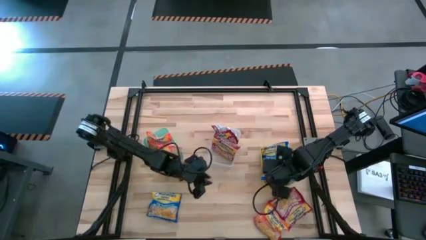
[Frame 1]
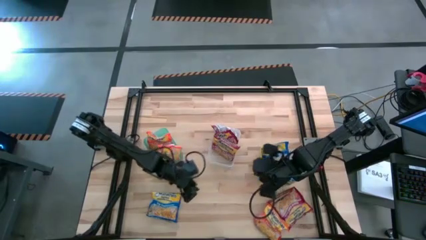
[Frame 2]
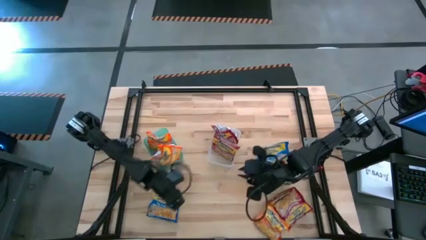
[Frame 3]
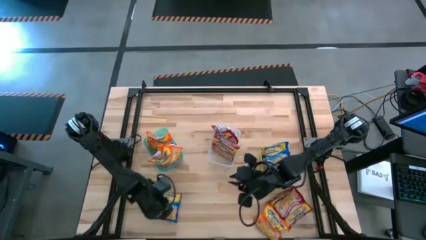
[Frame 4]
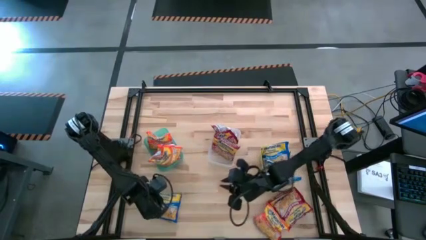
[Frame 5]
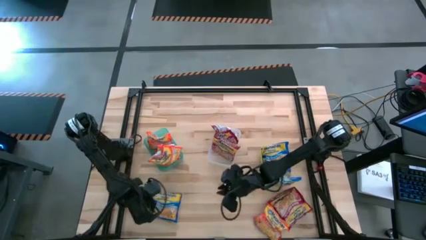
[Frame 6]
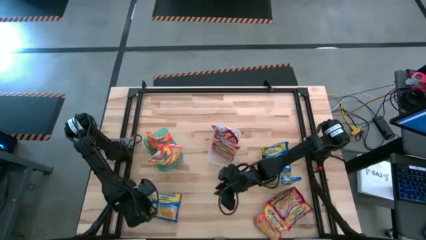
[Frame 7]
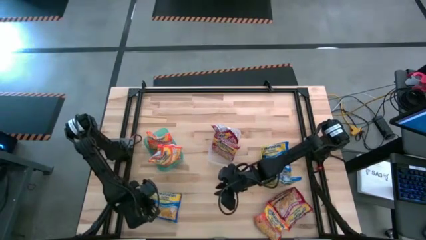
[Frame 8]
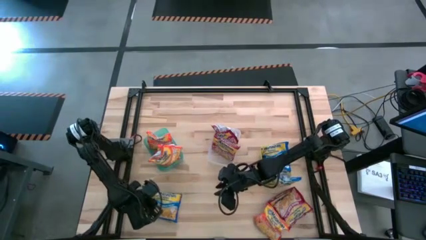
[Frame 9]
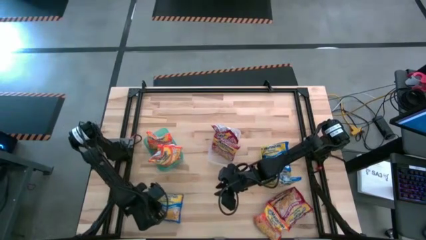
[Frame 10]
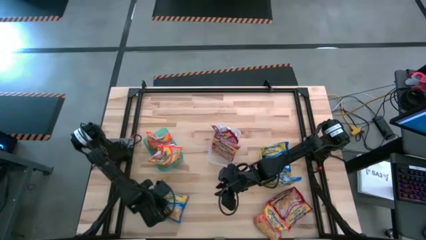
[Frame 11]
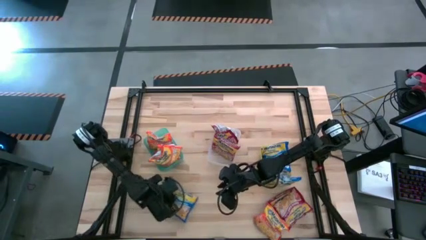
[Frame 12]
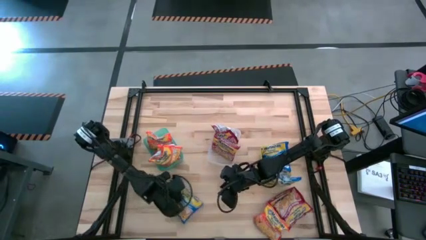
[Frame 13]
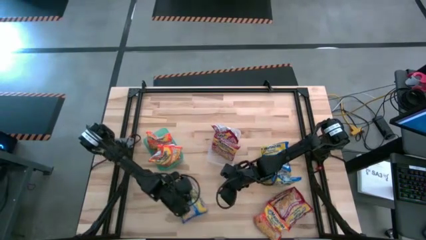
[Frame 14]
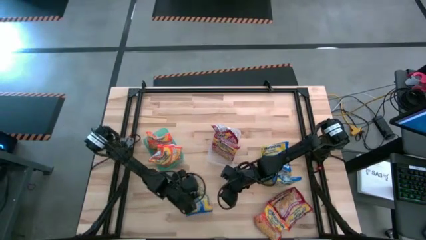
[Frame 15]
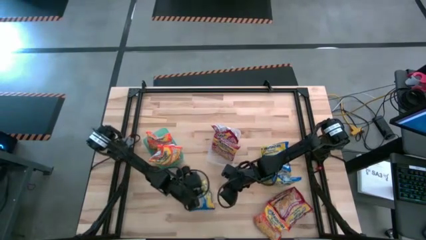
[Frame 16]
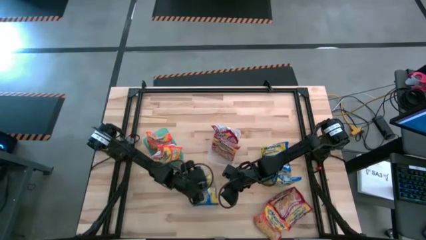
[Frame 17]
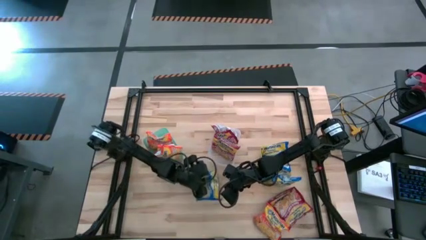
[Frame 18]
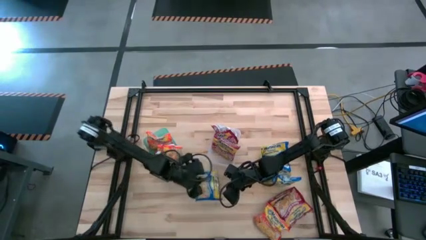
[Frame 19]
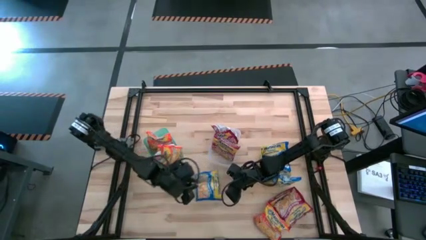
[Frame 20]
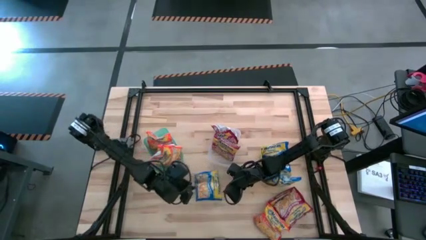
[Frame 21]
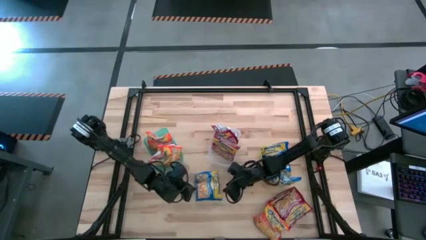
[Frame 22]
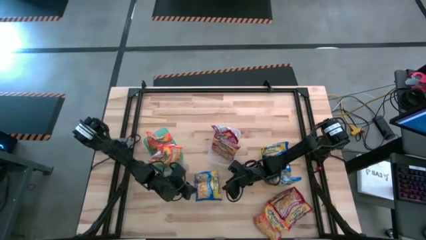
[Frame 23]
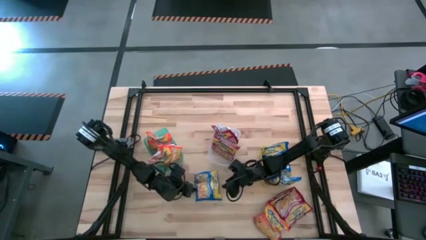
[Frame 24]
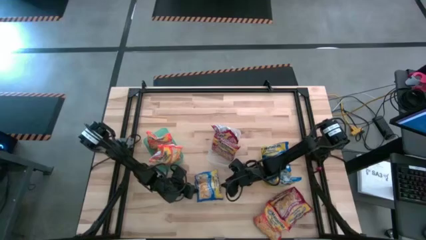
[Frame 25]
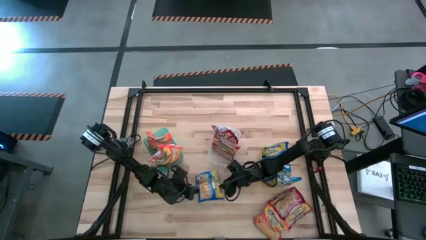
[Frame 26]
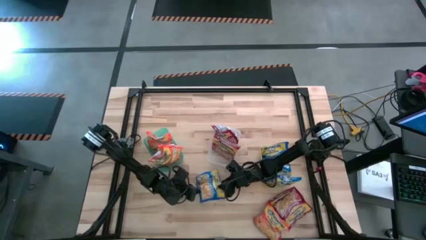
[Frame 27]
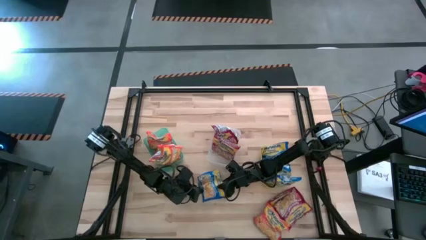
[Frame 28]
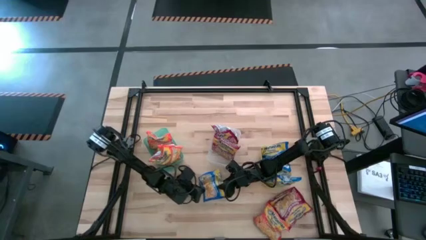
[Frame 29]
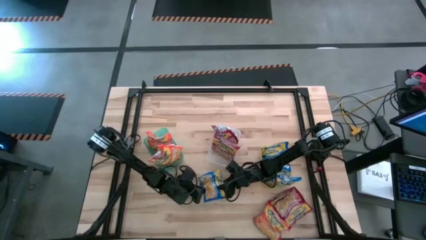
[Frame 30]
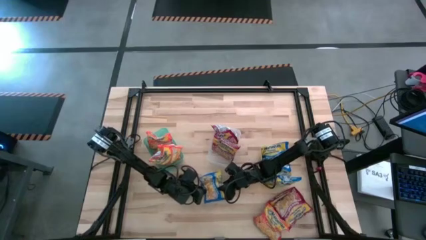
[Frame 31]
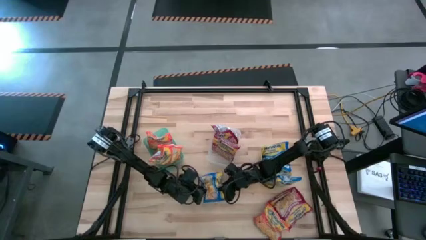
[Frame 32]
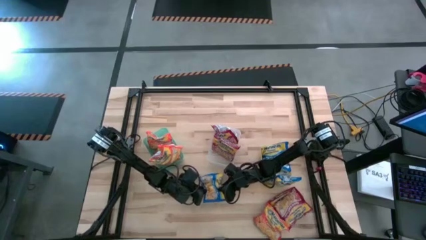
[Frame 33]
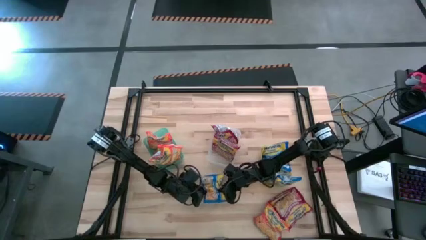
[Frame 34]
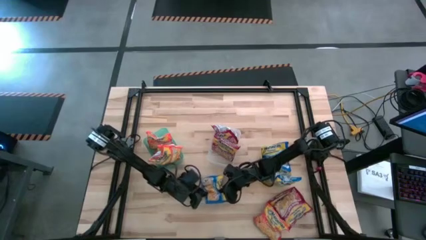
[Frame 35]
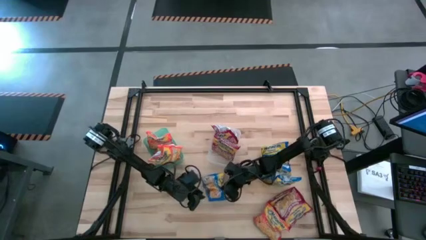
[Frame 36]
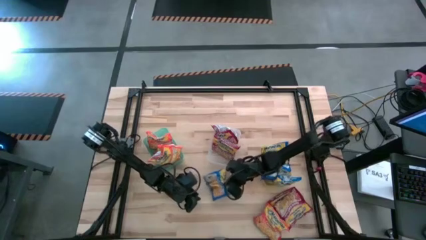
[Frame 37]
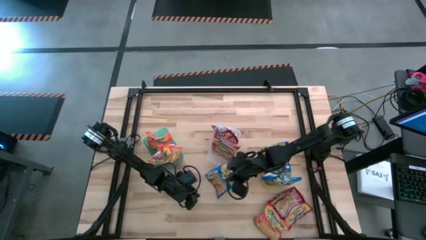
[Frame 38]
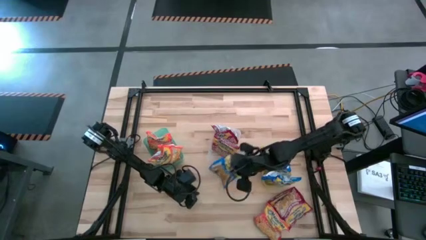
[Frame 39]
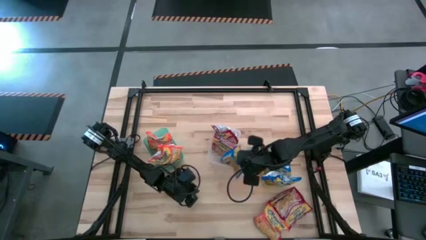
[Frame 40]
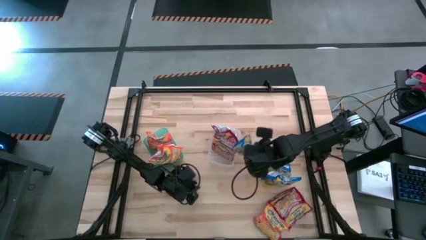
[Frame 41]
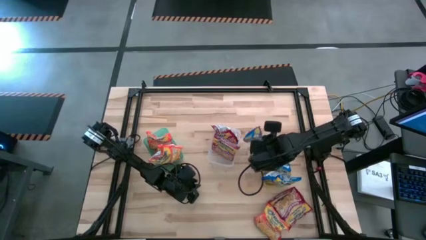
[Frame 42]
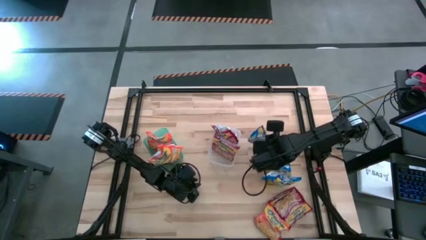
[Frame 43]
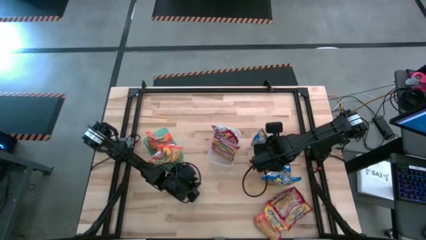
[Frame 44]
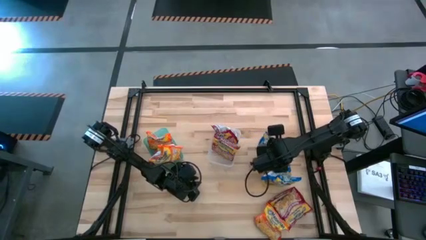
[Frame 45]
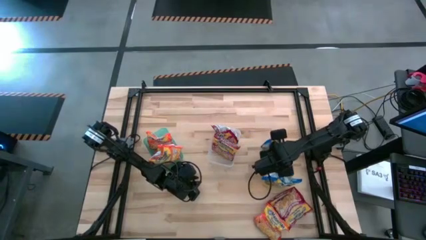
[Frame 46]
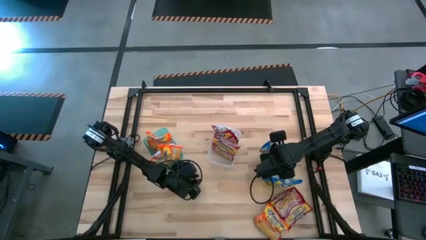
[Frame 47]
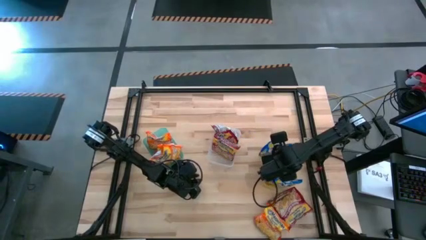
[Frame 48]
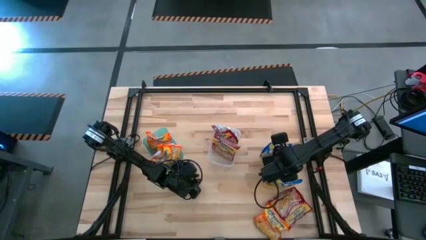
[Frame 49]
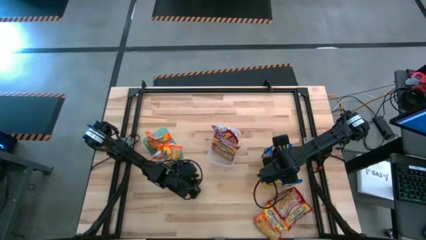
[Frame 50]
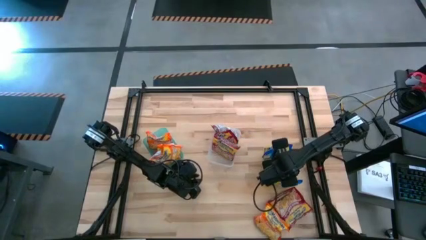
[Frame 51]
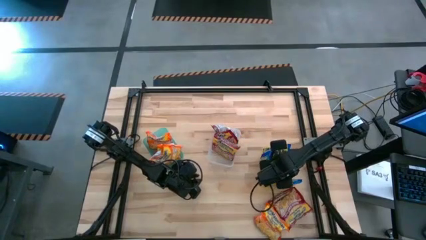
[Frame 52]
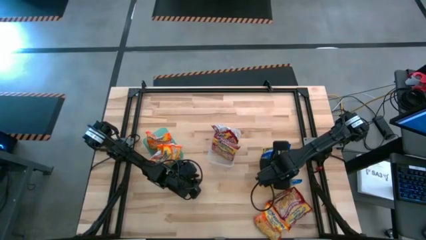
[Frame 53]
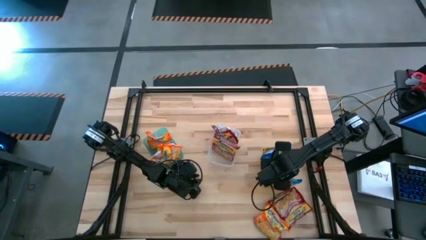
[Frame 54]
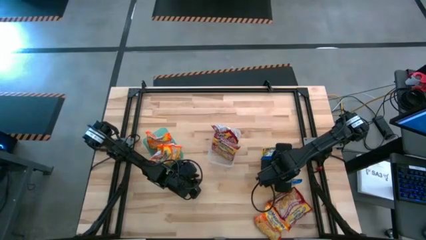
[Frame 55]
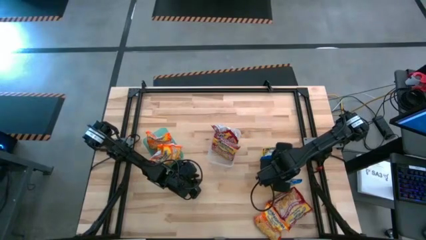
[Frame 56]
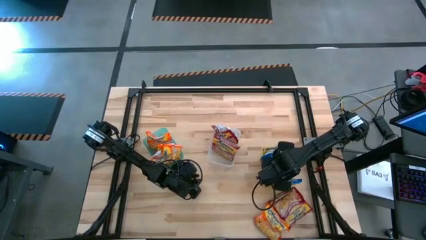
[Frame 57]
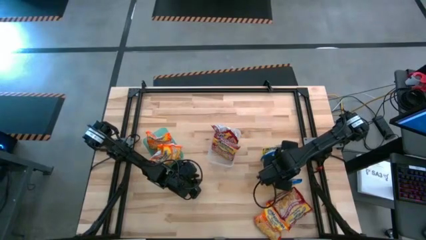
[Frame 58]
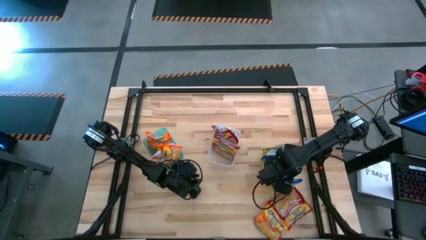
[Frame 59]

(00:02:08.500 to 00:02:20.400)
Task: Sort Maruchan noodles
Put the blue noodle pack into the yellow bin

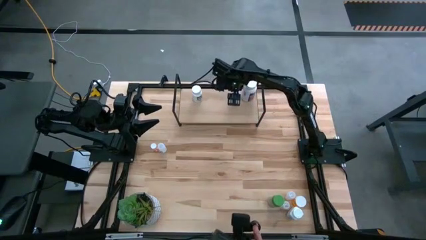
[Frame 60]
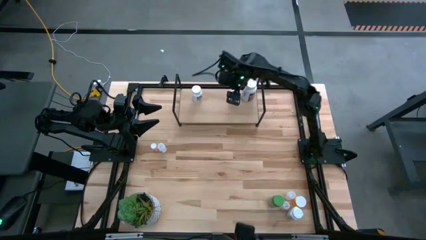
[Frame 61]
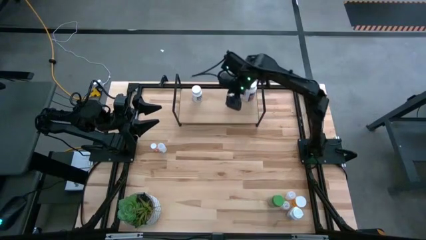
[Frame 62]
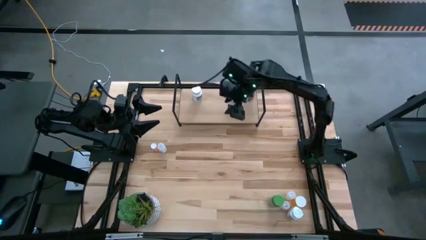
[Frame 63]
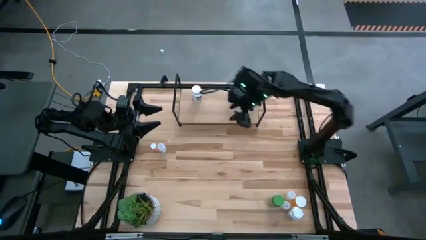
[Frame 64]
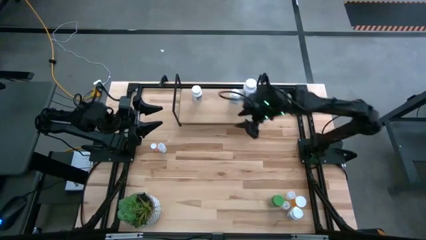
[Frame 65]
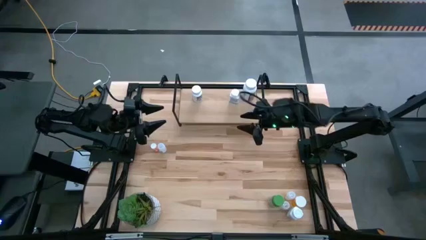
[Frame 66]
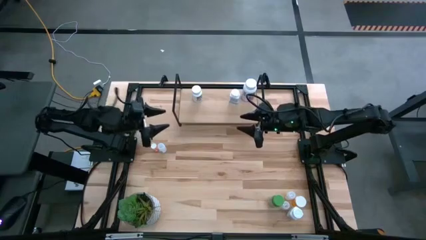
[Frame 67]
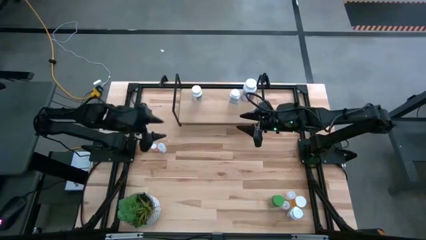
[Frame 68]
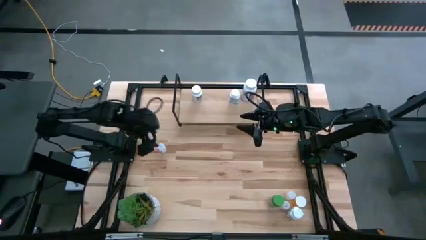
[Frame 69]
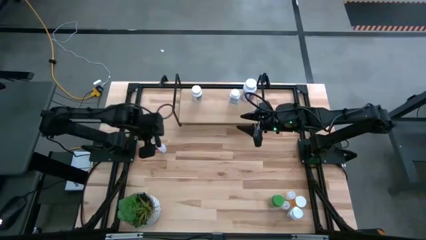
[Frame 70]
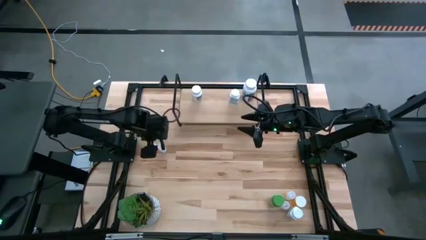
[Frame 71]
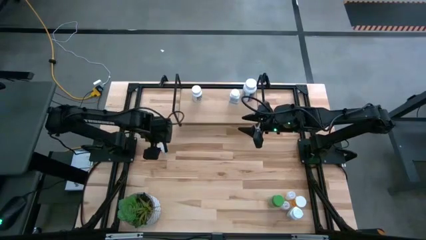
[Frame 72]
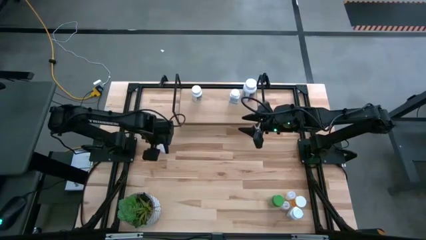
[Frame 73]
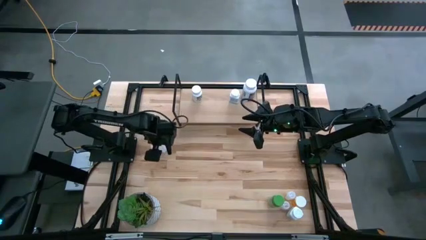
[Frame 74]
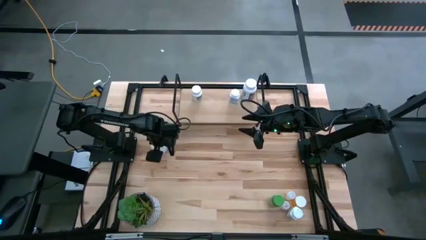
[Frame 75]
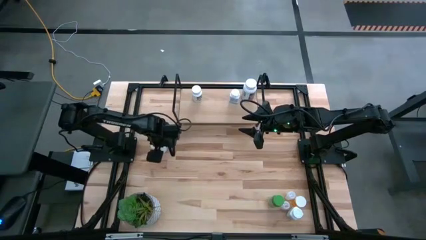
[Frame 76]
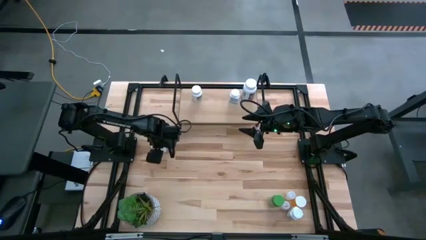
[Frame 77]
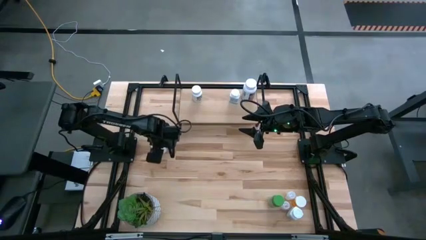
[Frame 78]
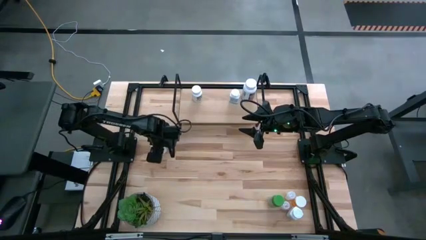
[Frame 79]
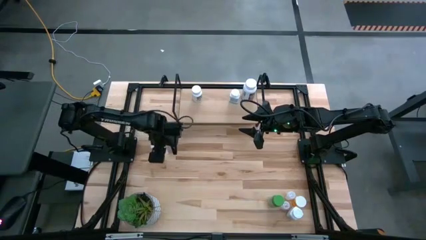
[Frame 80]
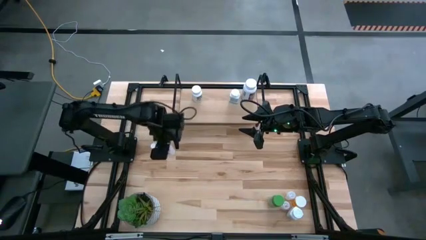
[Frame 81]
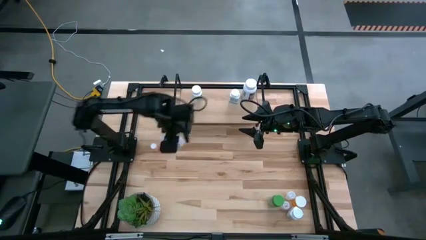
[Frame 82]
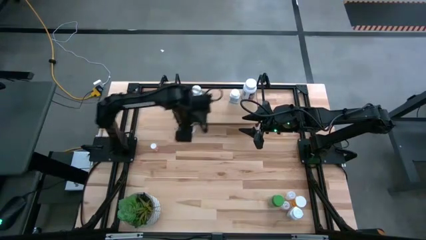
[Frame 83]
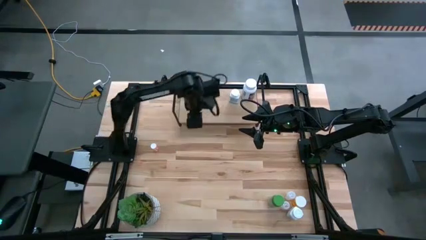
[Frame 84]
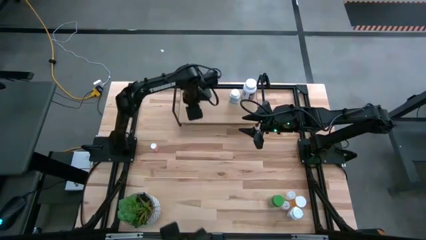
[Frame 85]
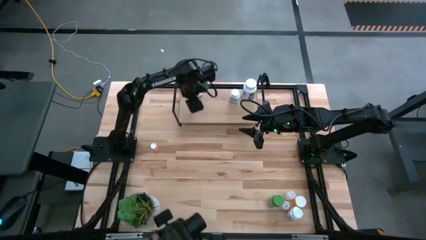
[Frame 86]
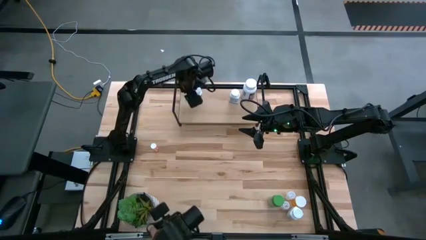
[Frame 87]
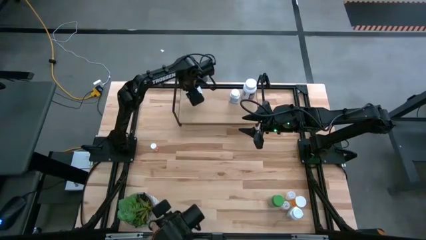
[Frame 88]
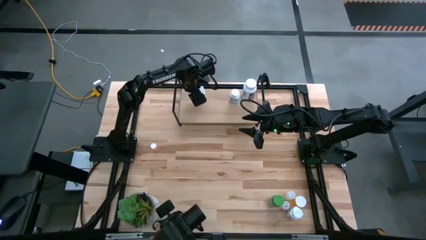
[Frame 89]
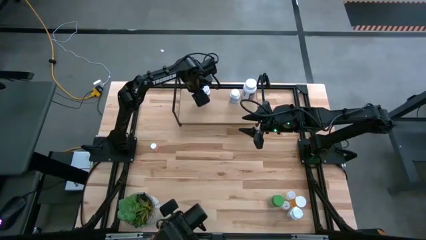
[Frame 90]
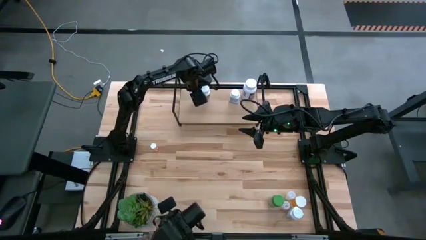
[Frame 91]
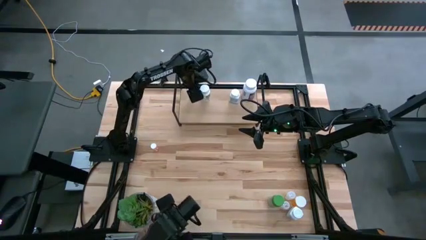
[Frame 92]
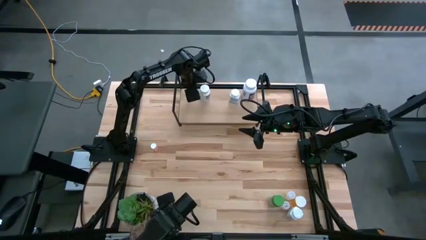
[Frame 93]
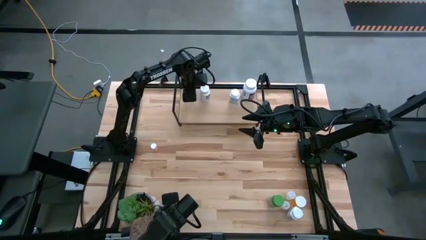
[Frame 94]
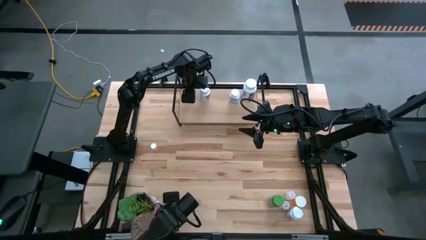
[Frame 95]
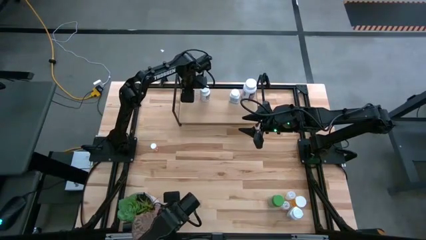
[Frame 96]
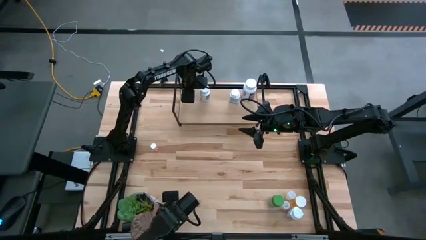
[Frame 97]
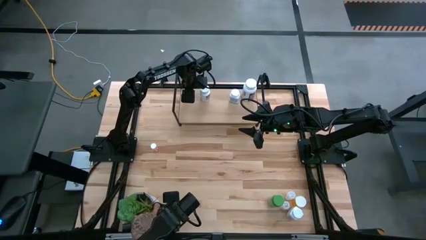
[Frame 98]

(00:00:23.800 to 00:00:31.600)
Task: Pick and place medicine bottles onto shelf by color
Put the transparent pill bottle on the shelf
